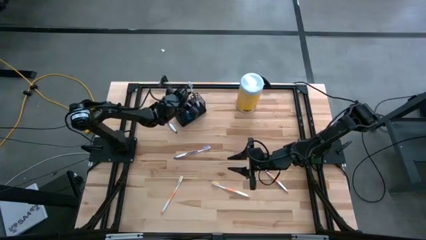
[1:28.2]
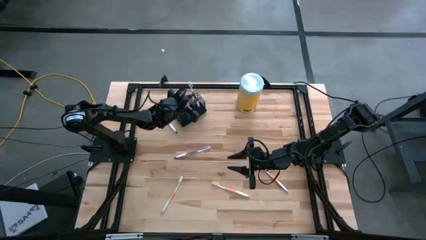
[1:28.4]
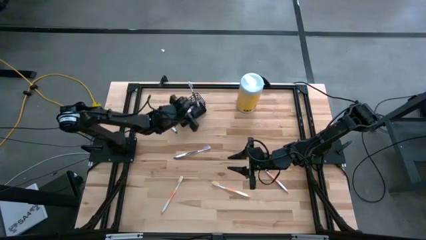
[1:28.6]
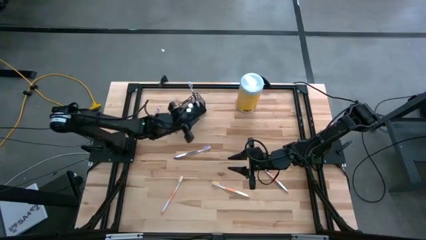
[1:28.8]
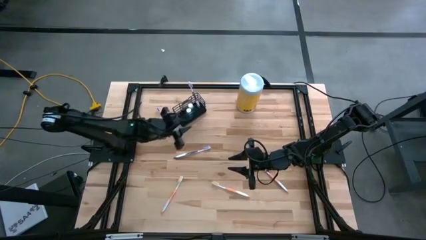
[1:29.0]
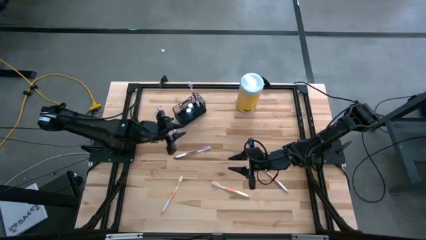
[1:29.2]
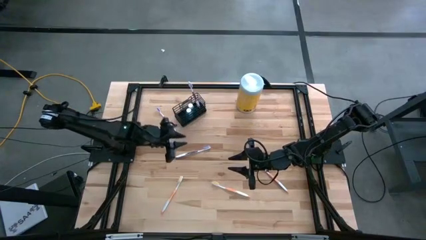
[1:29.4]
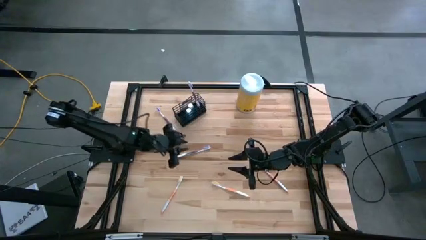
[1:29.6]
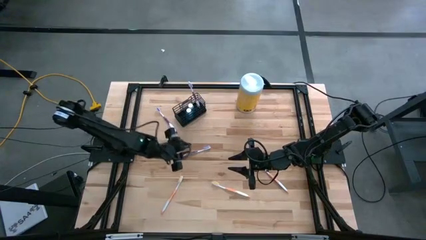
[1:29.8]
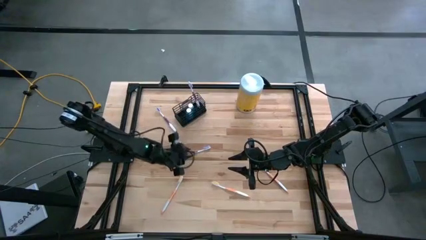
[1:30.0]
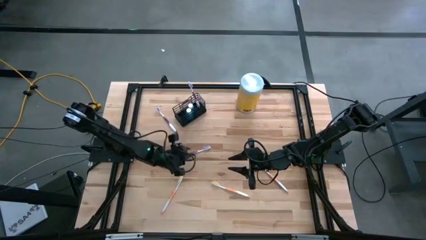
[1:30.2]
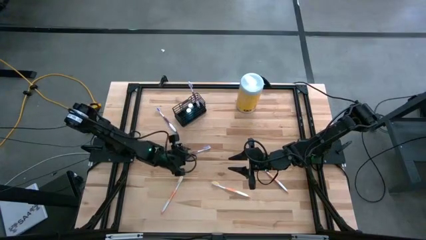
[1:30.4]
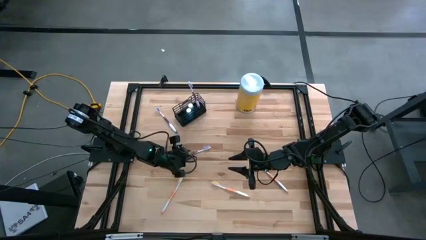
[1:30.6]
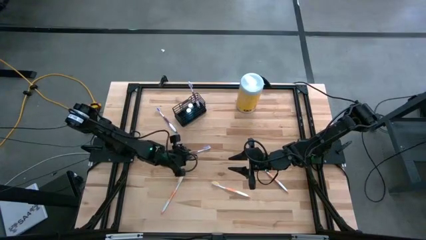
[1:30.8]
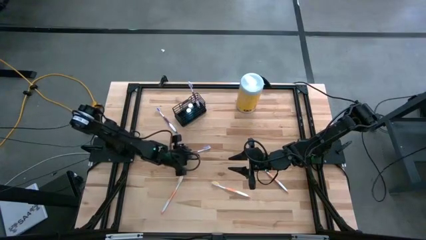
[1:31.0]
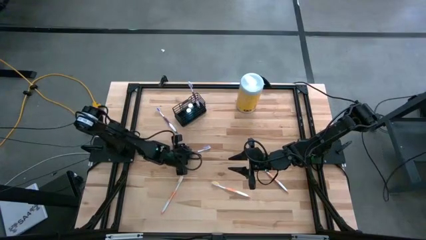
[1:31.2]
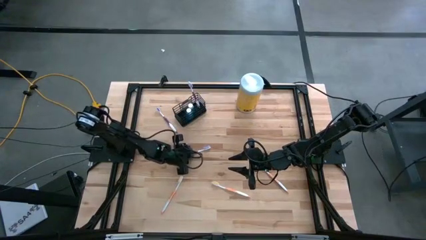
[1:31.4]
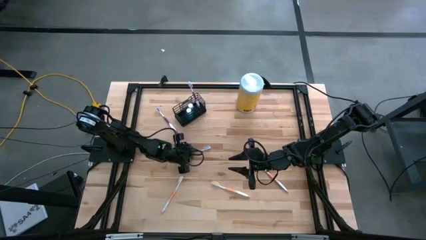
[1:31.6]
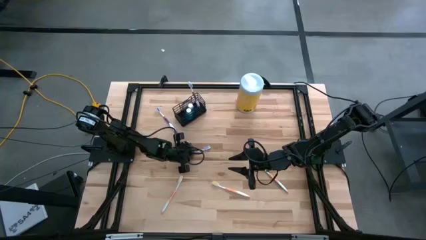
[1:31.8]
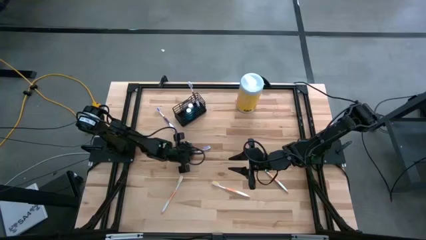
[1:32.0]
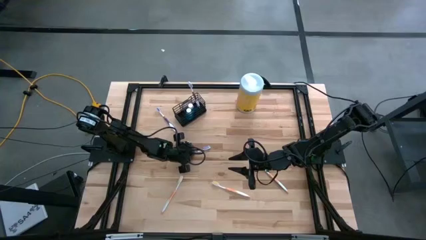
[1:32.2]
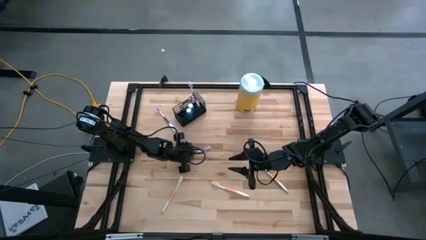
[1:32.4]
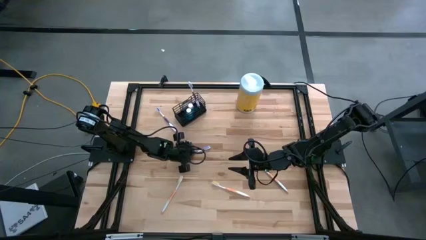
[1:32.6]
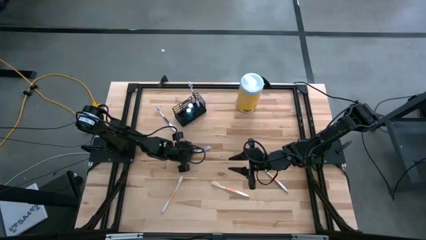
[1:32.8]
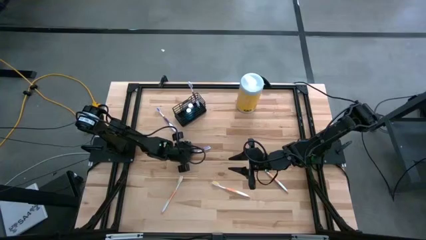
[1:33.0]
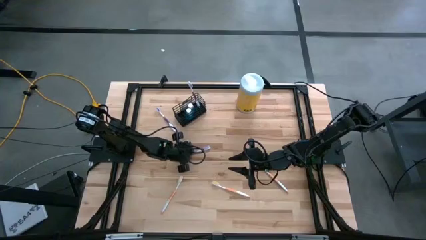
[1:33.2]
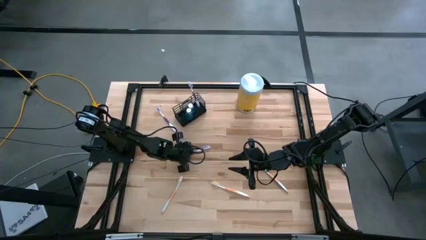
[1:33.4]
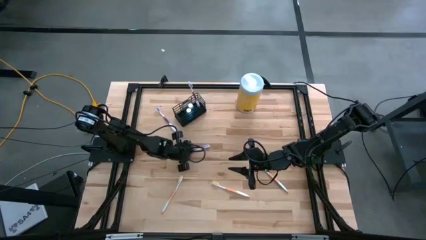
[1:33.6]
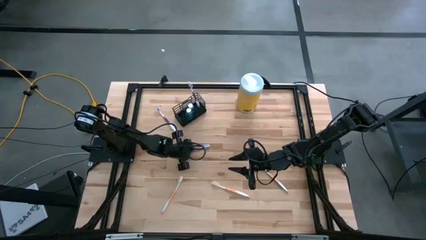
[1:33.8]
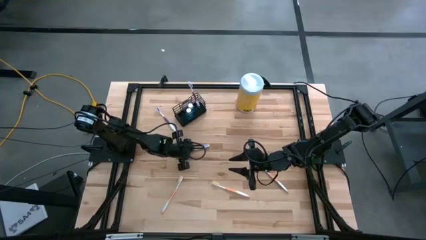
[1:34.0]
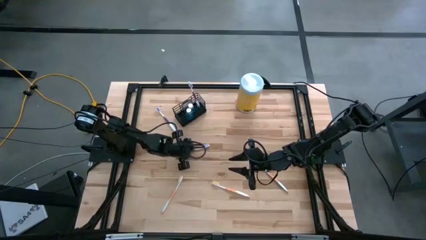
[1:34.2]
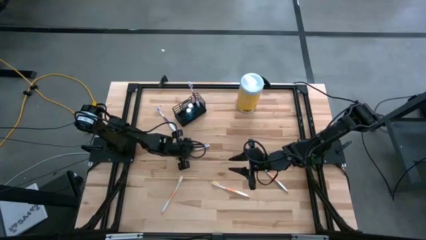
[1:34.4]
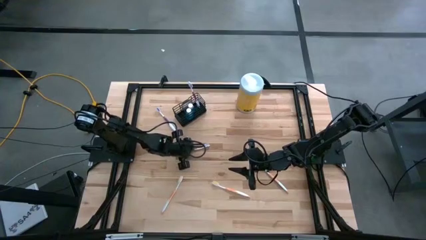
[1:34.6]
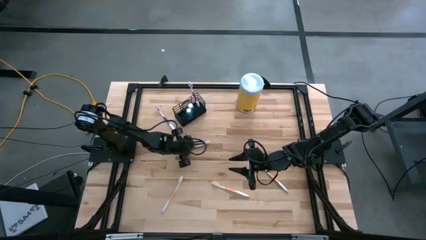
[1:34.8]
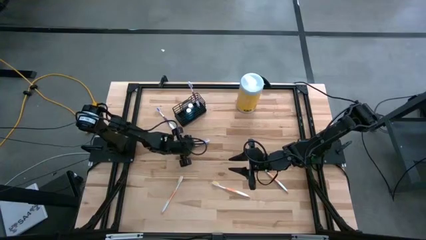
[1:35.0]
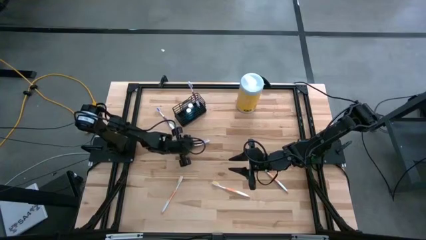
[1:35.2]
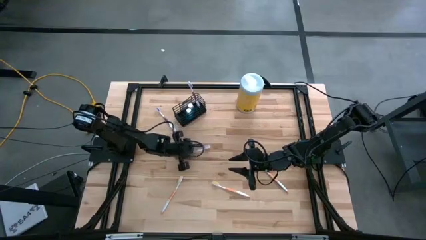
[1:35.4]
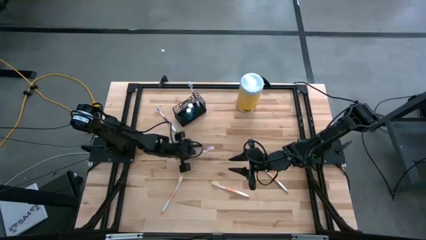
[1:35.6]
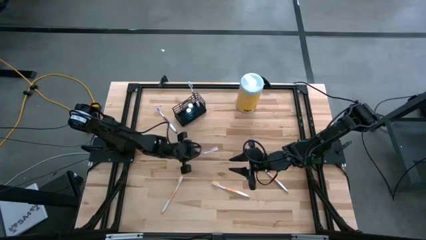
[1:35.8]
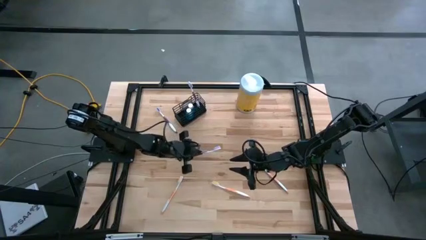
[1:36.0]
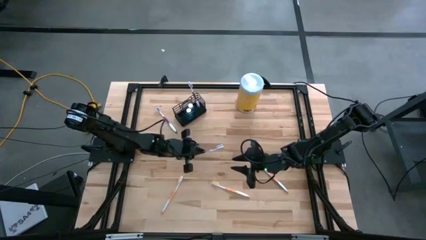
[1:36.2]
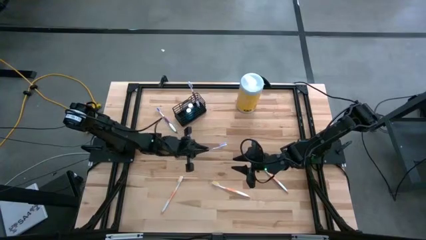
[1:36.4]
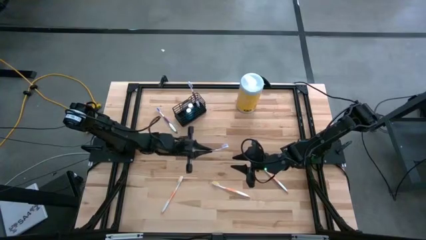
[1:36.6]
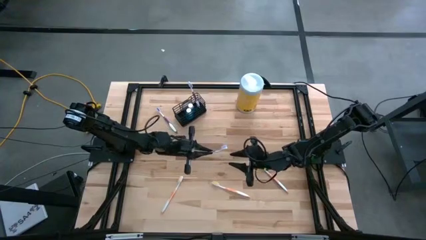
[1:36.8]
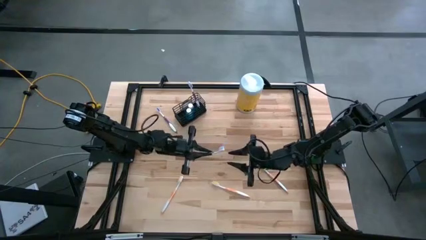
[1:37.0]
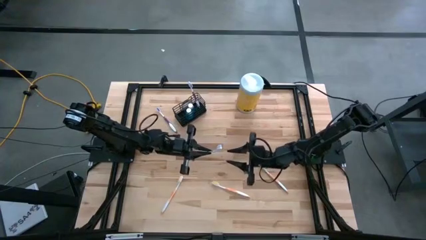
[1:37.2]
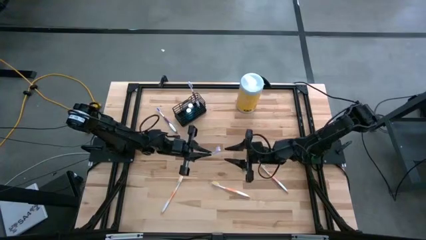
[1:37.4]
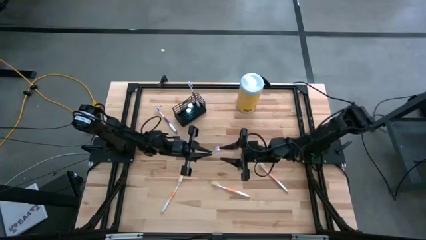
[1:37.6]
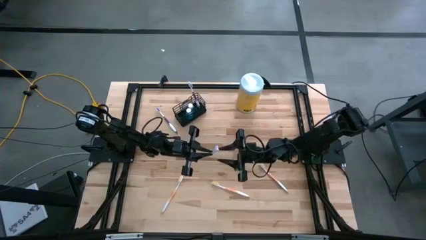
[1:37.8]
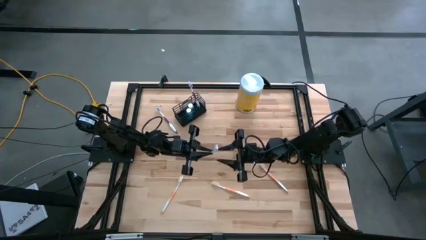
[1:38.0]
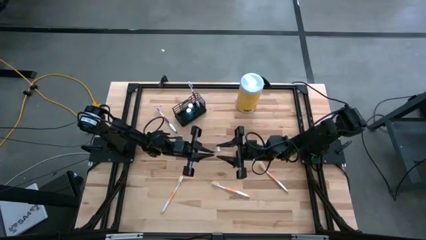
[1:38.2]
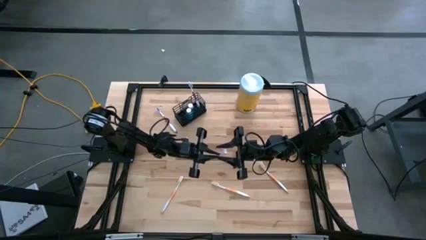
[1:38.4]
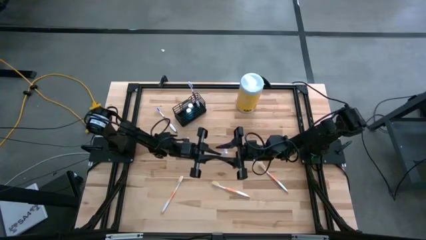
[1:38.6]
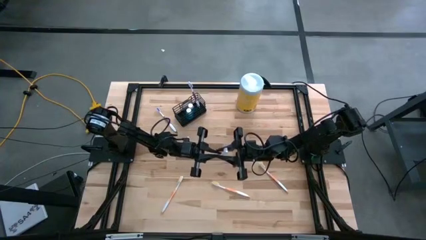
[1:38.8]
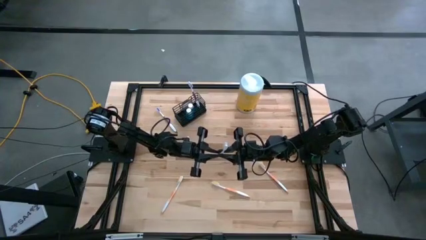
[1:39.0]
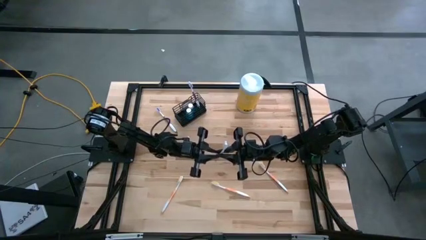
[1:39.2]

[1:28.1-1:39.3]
Task: Pick & Place toothbrushing station
Put the bottom purple toothbrush into the right section of the wire organizer

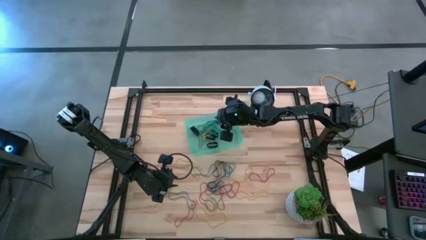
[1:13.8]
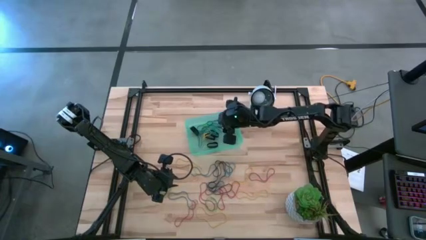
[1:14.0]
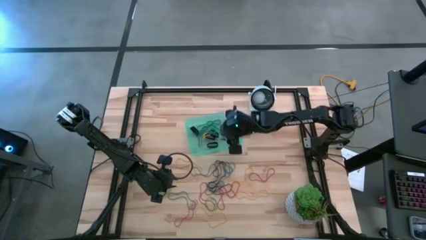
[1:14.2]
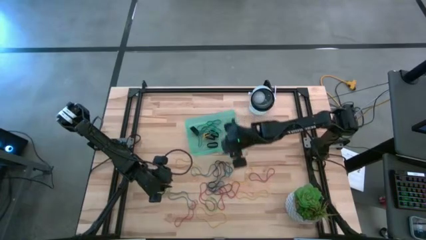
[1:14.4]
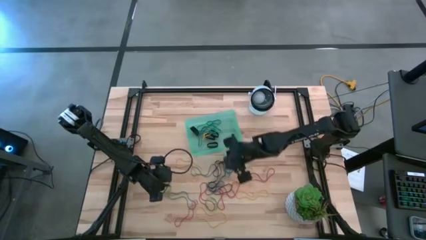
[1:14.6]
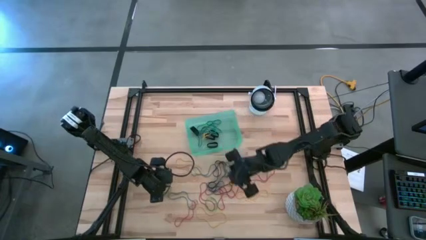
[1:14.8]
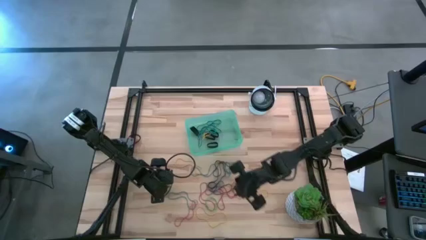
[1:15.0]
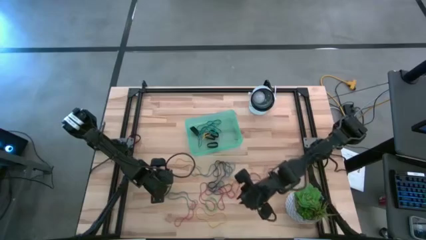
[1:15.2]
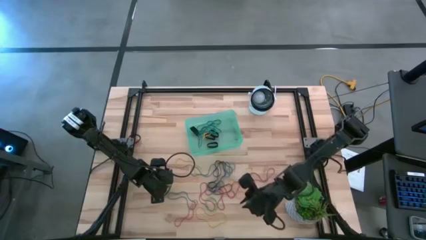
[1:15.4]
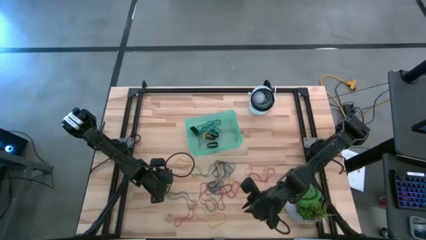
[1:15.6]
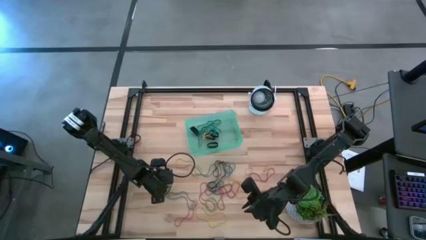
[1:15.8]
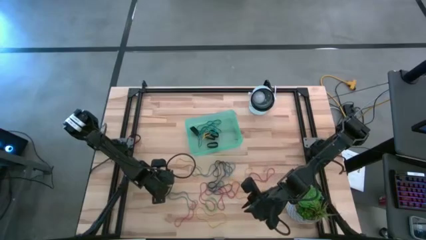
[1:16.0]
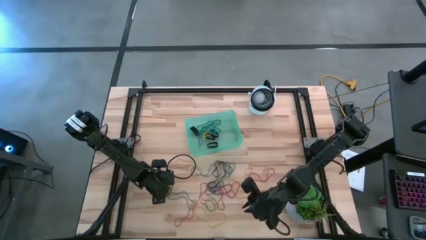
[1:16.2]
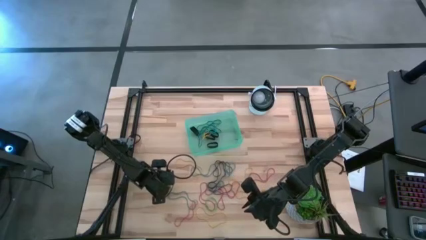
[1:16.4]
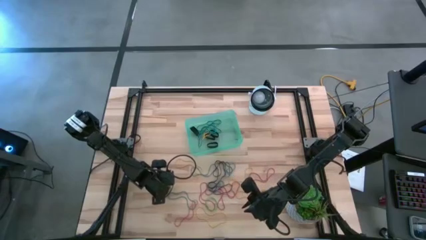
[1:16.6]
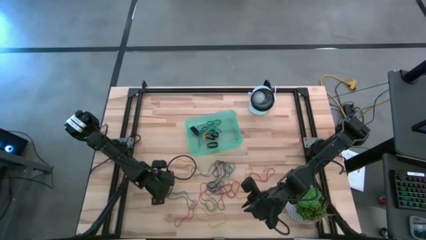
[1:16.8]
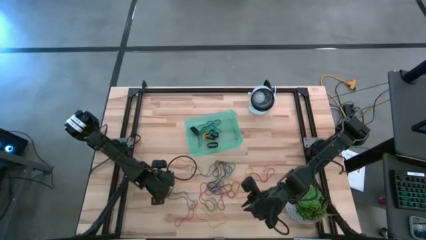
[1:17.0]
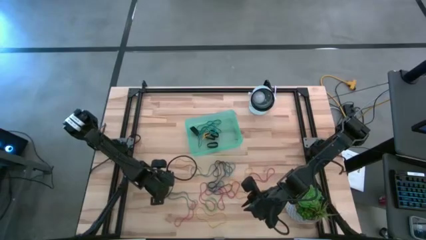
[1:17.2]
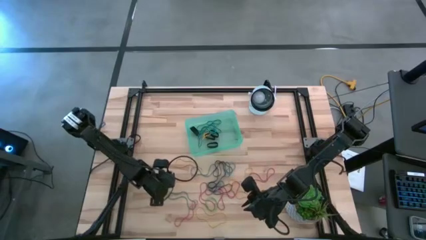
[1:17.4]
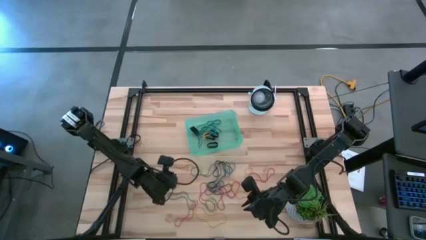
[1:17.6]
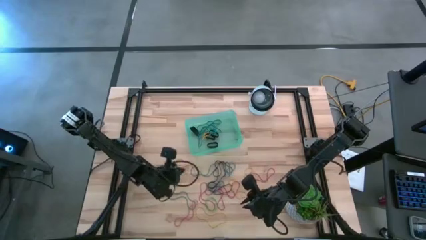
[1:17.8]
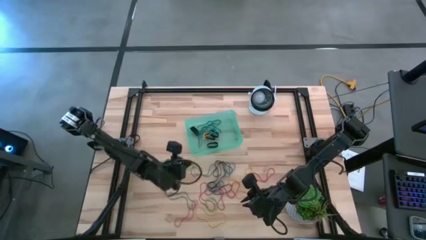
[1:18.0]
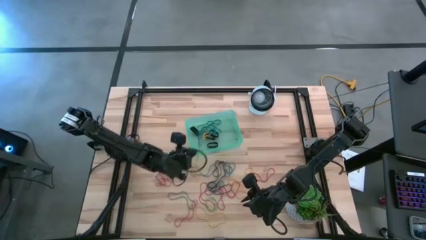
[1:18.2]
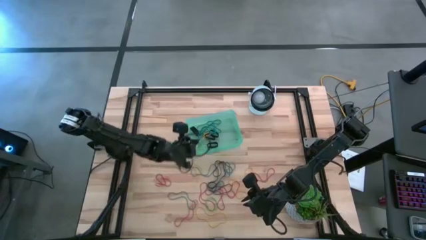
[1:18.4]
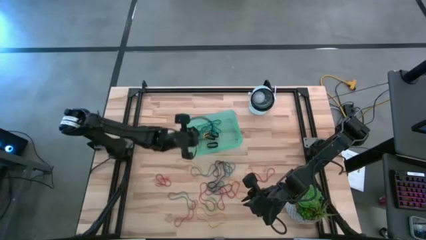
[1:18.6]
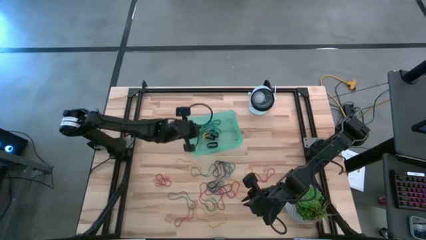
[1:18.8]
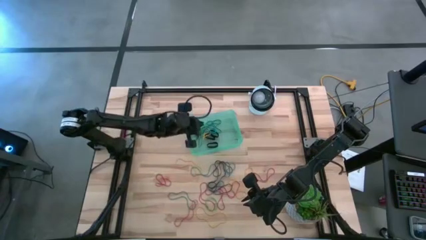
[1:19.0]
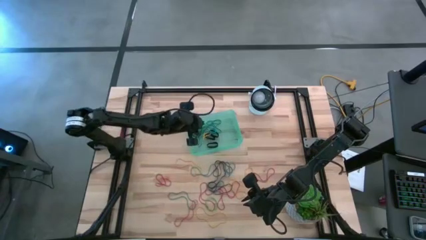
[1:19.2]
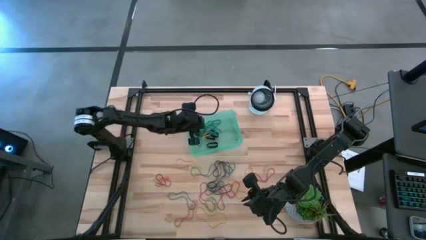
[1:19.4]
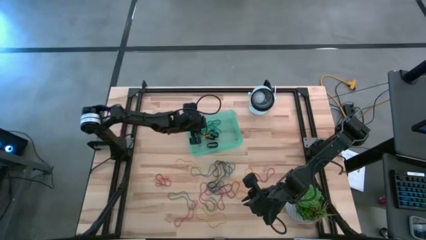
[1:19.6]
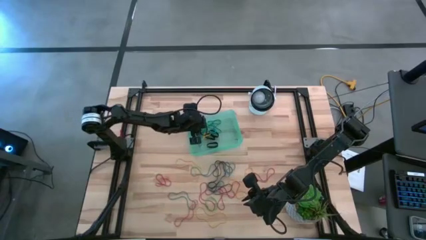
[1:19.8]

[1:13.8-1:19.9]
Task: Pick and place rubber bands into bin
Put the green rubber band into the green bin
